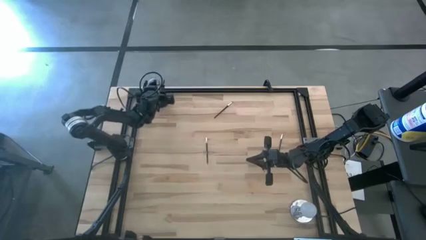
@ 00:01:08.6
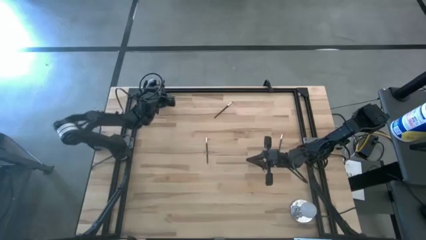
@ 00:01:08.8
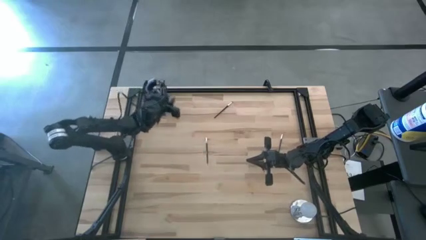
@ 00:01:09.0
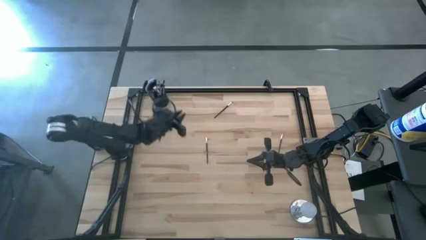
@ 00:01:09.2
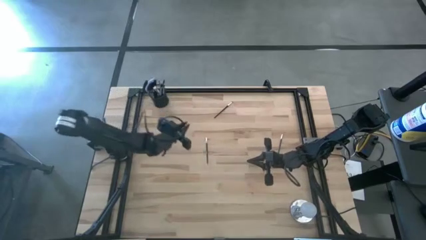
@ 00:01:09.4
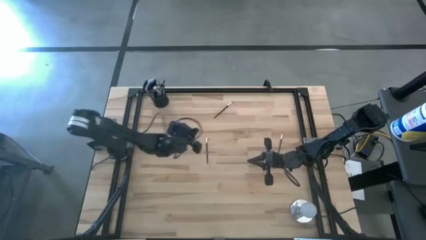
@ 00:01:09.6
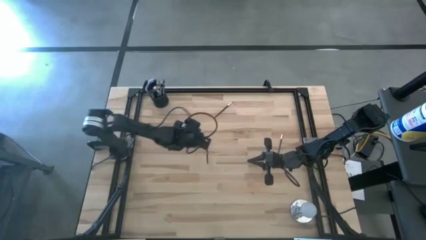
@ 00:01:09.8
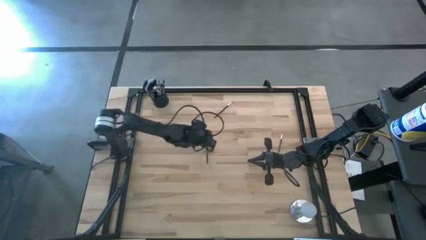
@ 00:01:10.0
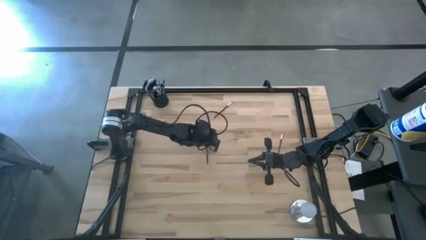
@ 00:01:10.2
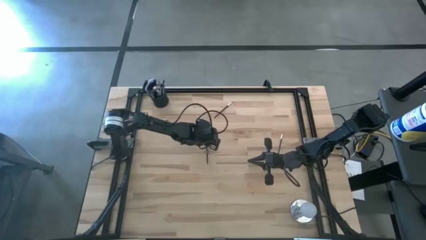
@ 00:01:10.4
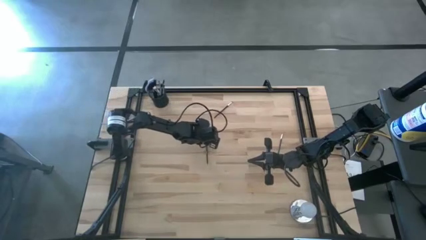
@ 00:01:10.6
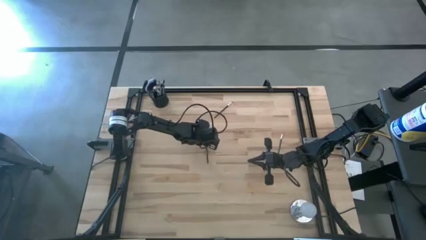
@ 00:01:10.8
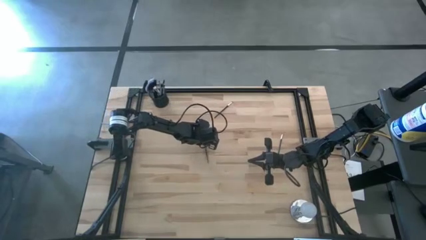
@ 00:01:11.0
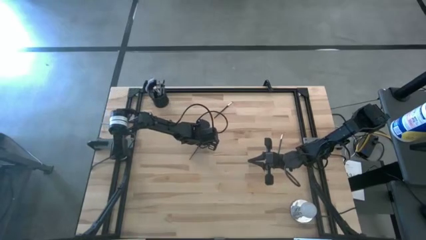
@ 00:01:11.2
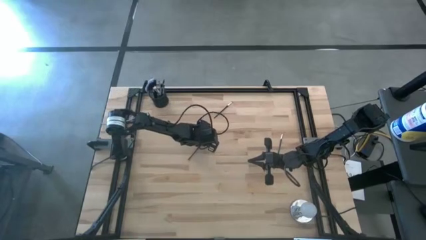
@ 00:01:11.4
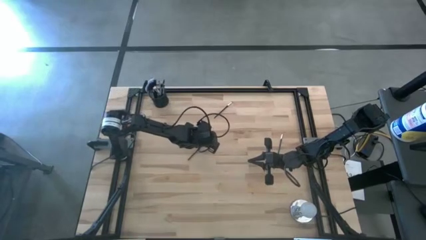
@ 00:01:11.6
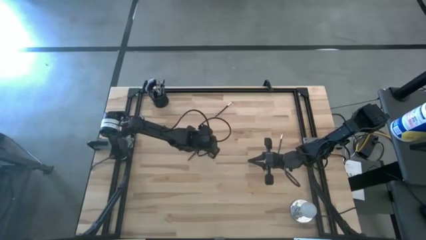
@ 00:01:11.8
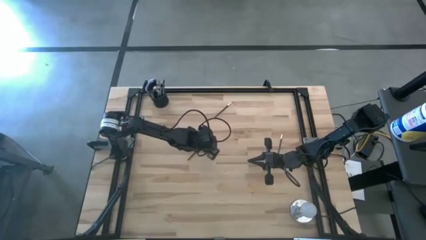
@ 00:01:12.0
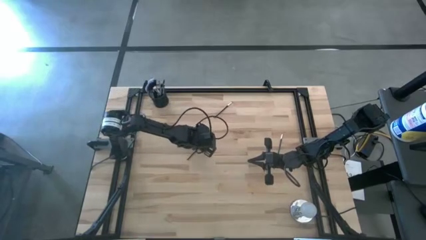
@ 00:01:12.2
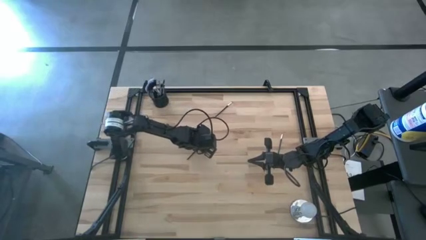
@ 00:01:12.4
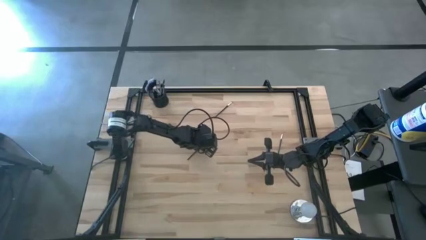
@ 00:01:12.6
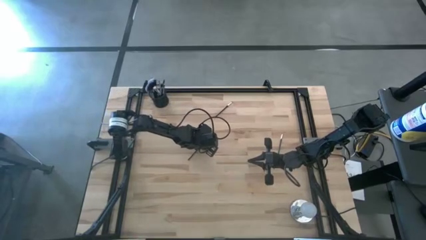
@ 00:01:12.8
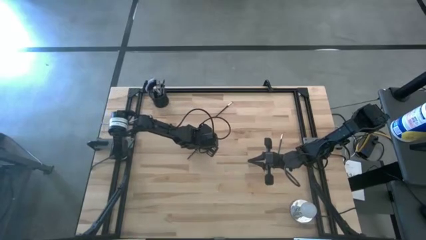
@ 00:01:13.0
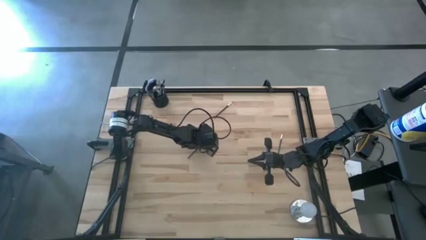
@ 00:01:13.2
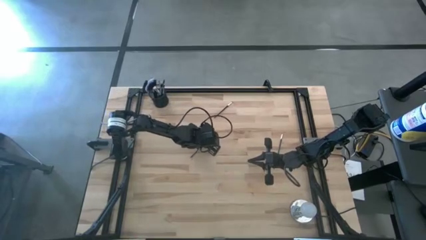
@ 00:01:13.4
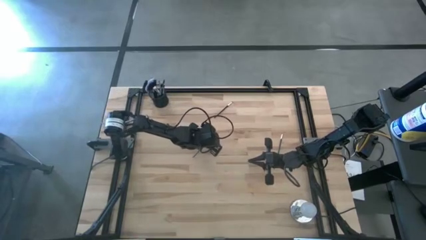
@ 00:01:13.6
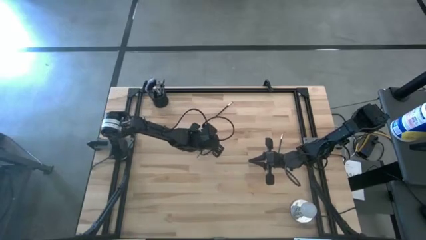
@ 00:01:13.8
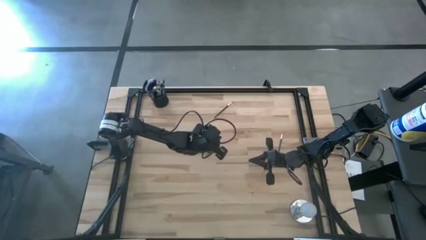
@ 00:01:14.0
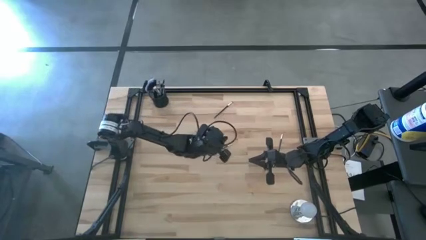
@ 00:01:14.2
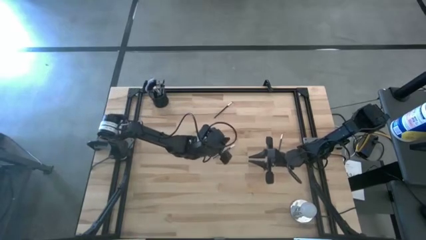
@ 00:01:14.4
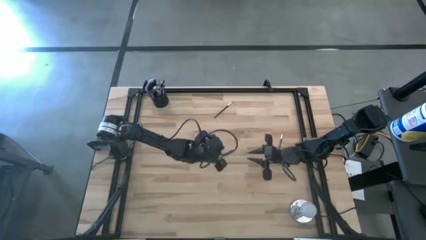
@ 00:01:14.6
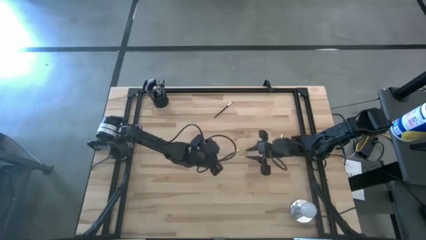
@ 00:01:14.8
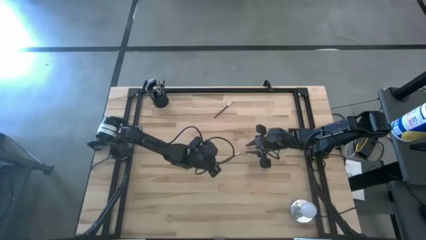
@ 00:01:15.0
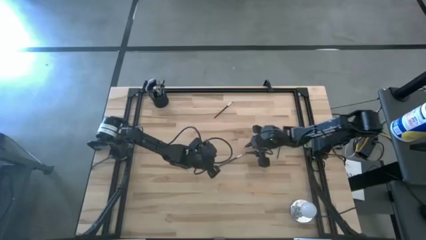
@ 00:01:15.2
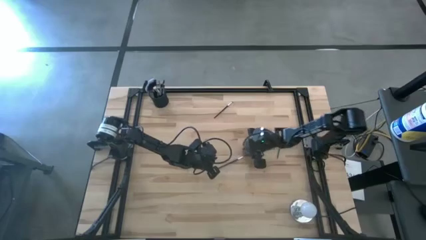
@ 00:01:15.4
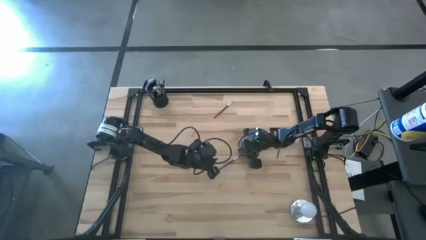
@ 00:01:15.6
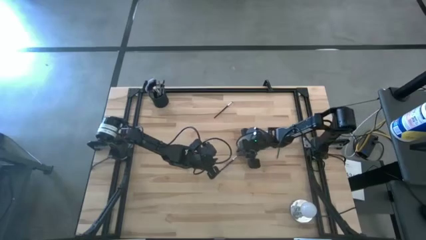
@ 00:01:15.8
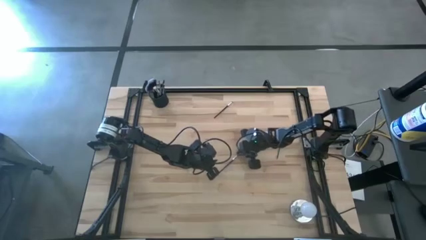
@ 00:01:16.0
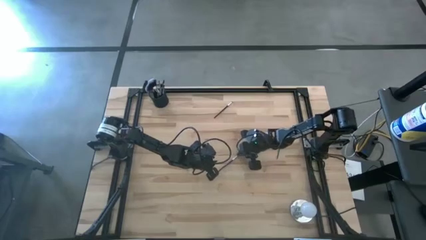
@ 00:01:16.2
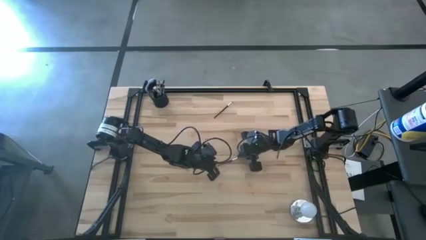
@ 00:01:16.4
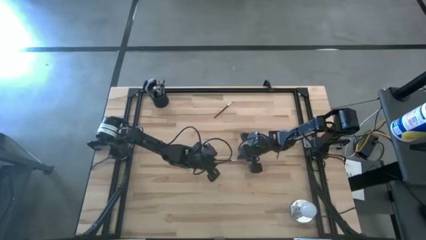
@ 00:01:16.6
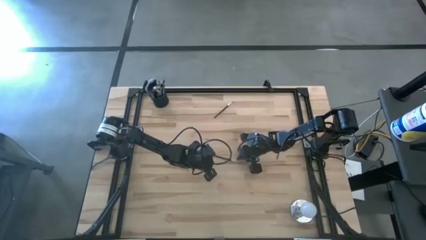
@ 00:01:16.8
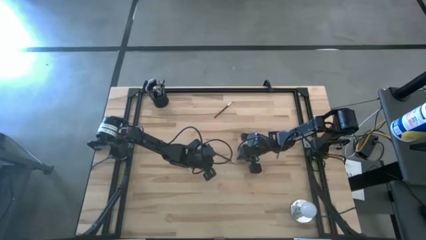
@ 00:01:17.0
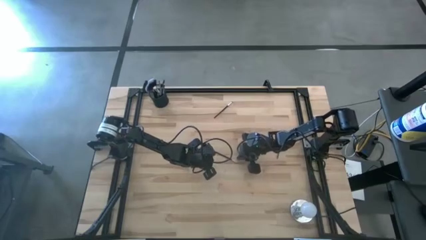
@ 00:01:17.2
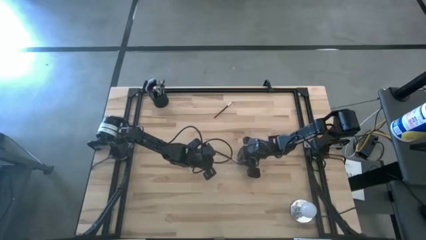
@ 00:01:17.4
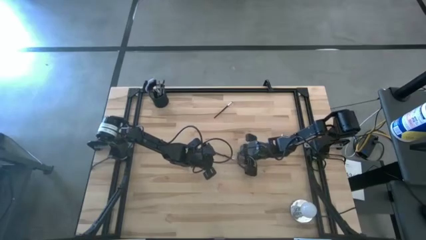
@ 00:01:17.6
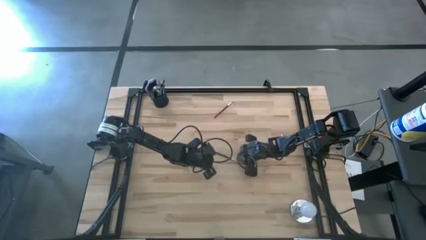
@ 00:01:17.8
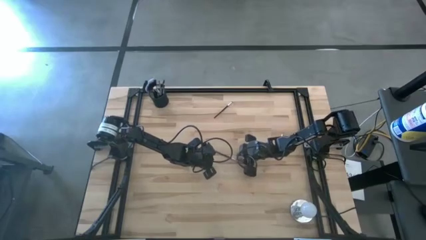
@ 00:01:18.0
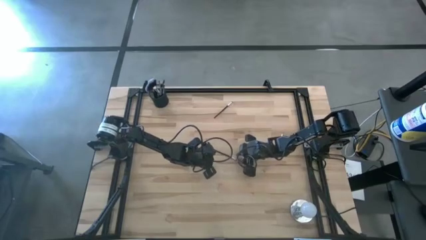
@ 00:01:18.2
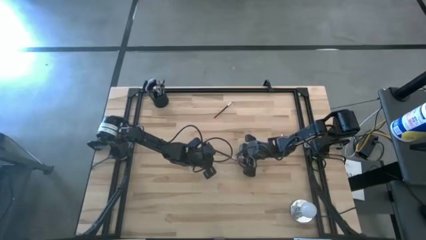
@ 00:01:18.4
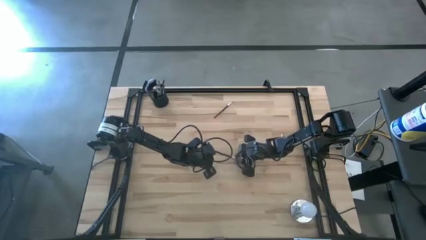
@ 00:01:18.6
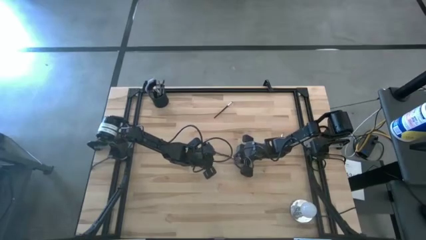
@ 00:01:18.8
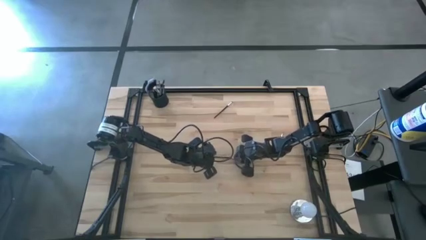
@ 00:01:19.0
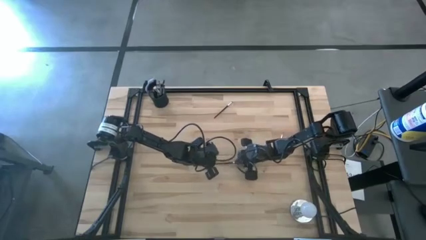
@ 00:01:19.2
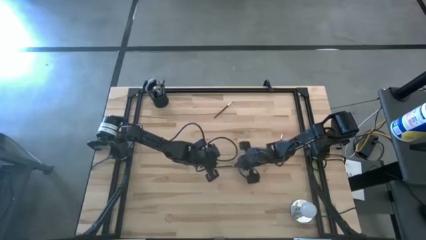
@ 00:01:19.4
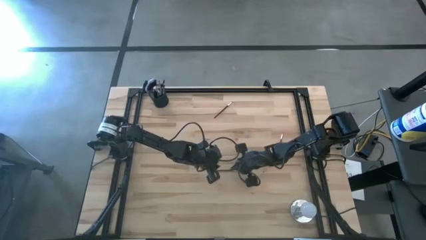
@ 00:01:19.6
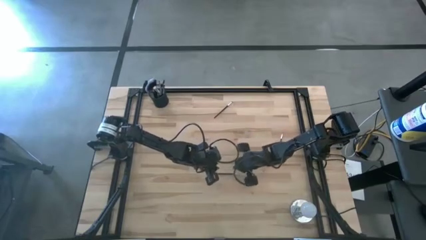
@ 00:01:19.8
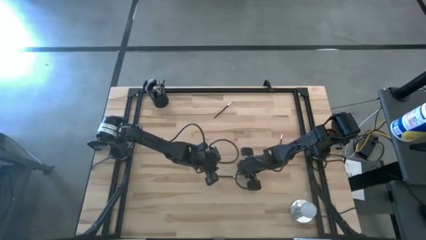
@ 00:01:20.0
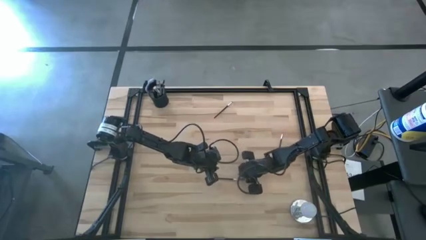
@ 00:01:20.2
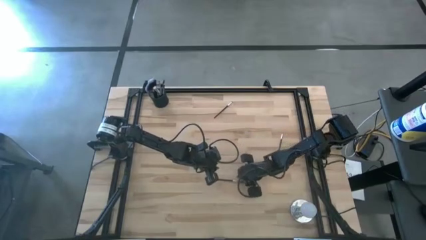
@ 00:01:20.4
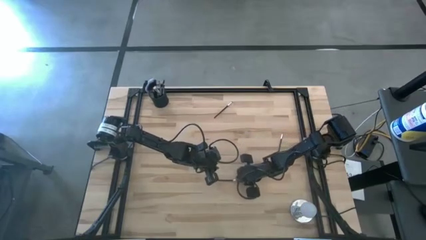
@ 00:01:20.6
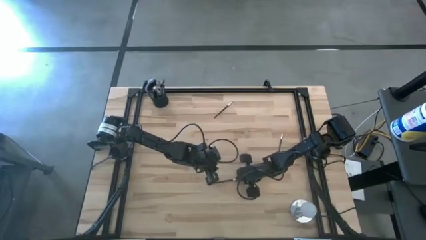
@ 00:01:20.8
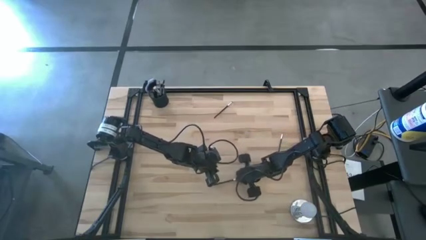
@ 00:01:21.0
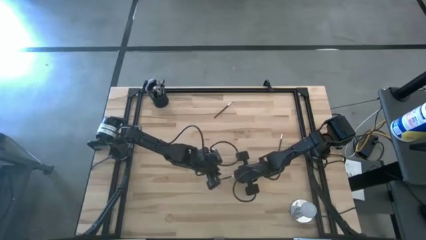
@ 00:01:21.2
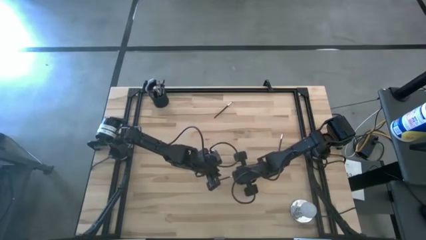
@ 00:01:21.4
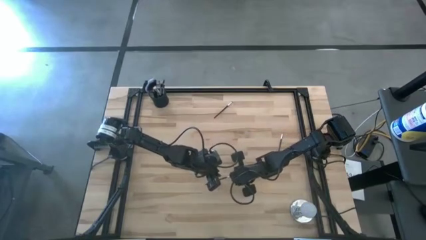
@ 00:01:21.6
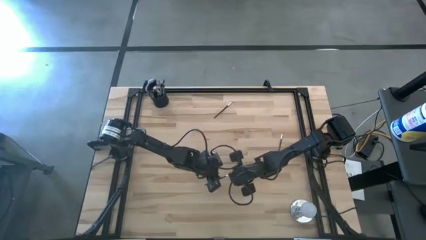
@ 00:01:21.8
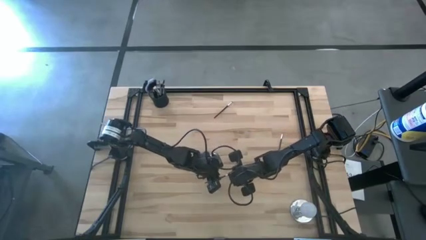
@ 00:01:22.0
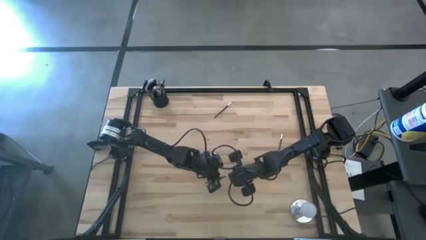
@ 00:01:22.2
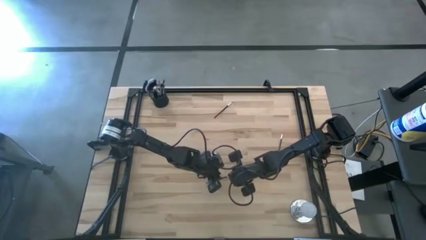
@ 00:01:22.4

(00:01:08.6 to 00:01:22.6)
Task: Put items in baskets/containers
Put the liner brush into the holder
